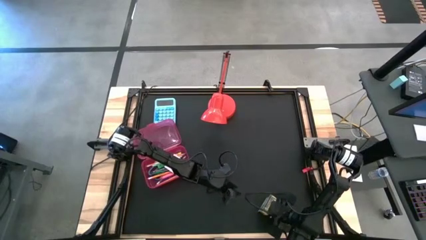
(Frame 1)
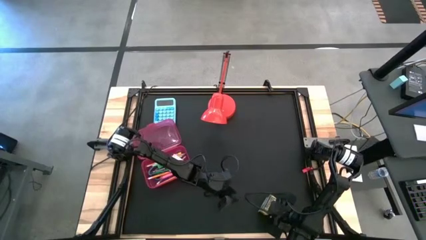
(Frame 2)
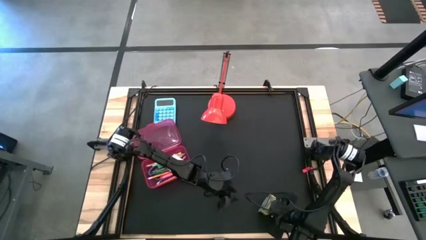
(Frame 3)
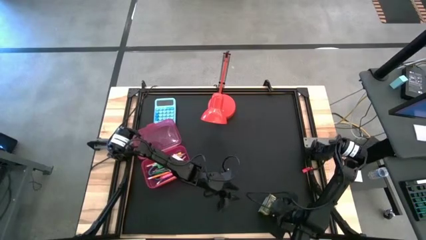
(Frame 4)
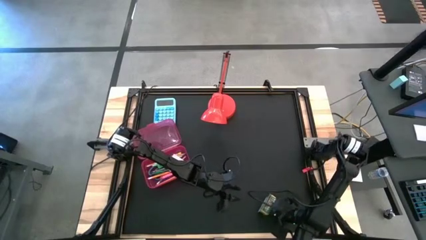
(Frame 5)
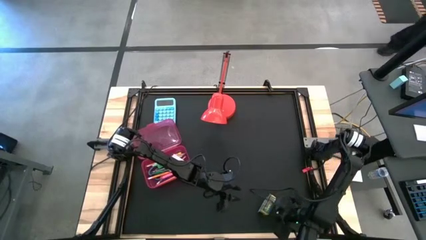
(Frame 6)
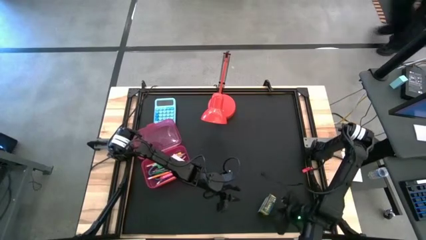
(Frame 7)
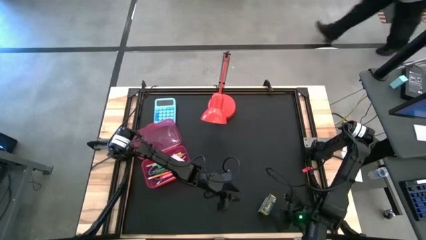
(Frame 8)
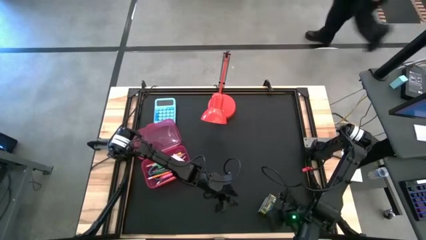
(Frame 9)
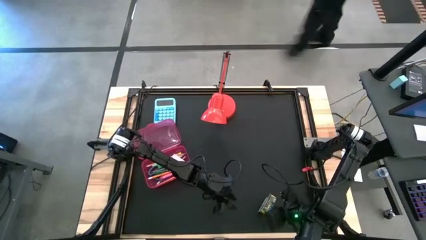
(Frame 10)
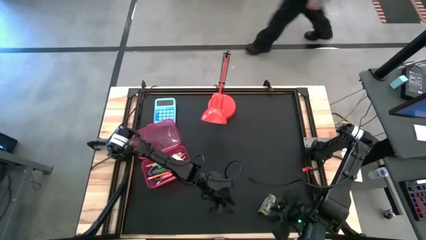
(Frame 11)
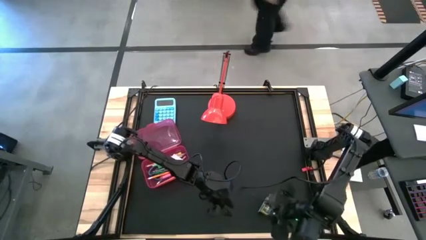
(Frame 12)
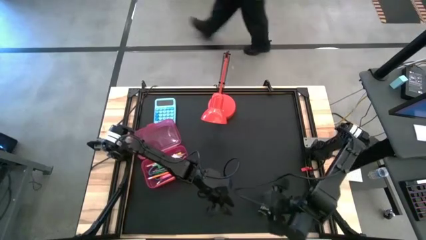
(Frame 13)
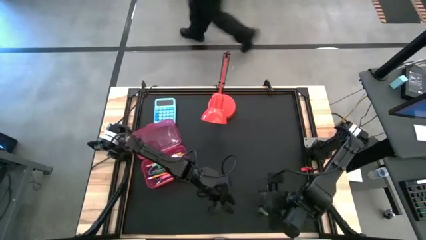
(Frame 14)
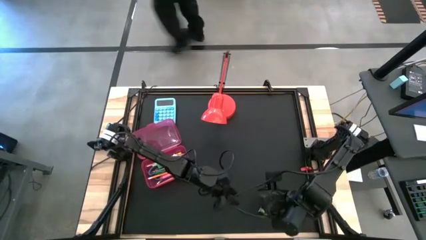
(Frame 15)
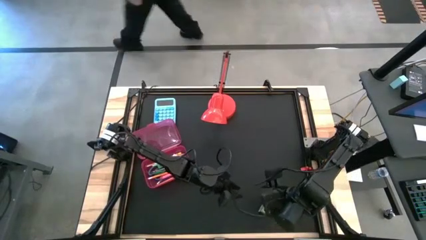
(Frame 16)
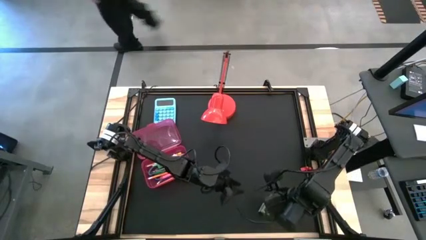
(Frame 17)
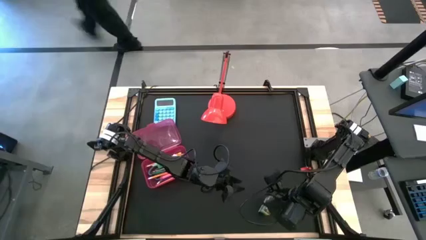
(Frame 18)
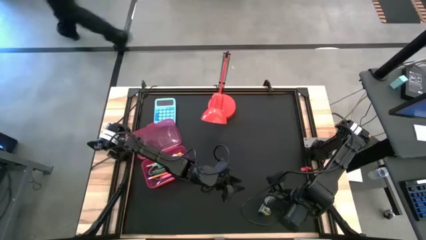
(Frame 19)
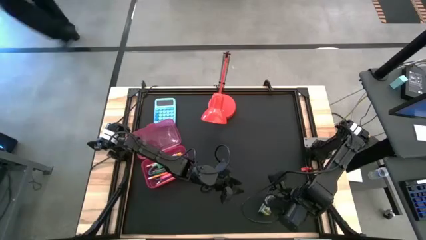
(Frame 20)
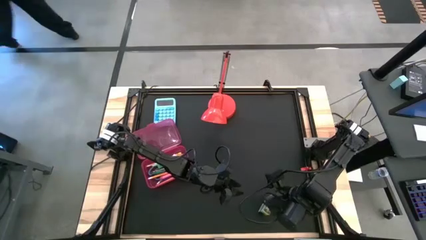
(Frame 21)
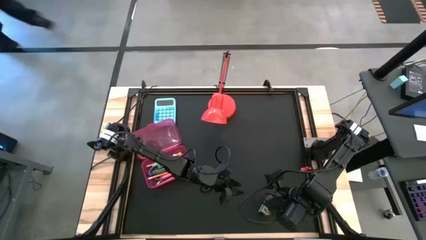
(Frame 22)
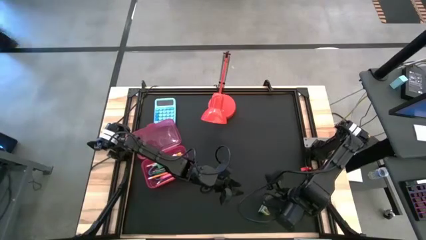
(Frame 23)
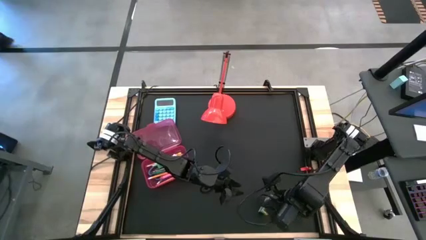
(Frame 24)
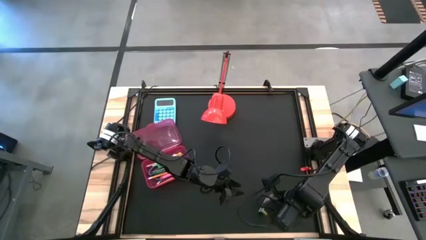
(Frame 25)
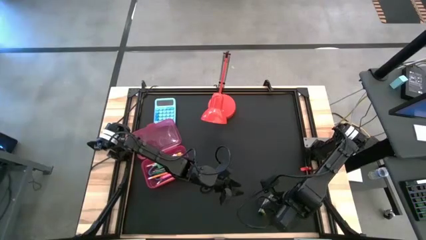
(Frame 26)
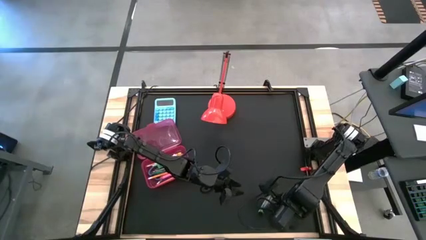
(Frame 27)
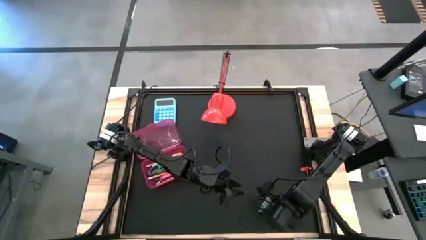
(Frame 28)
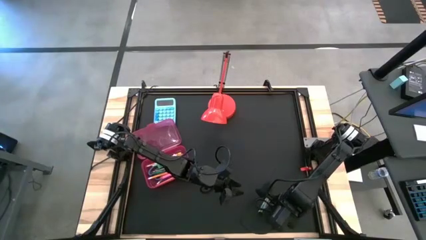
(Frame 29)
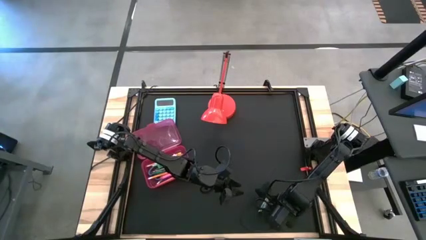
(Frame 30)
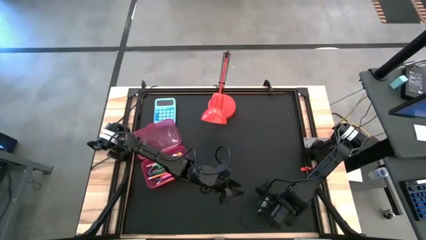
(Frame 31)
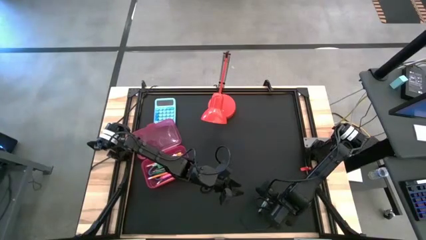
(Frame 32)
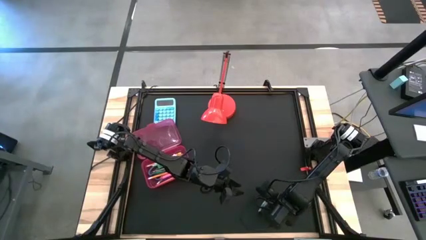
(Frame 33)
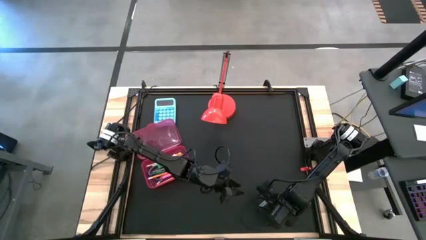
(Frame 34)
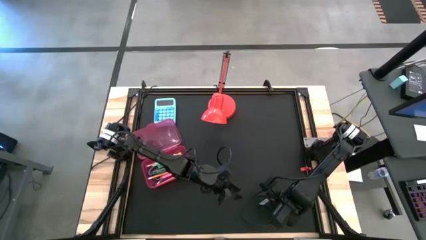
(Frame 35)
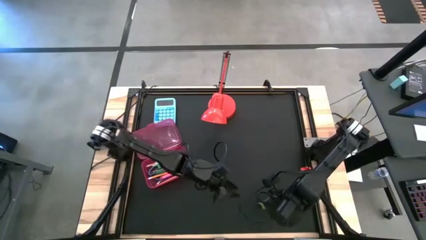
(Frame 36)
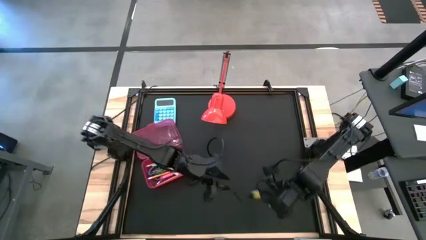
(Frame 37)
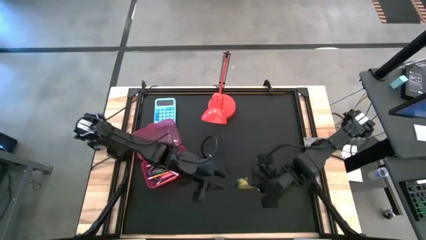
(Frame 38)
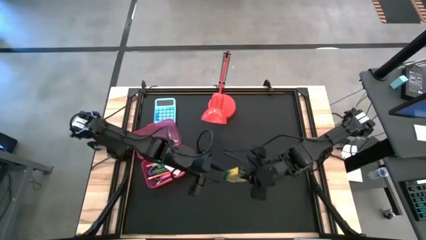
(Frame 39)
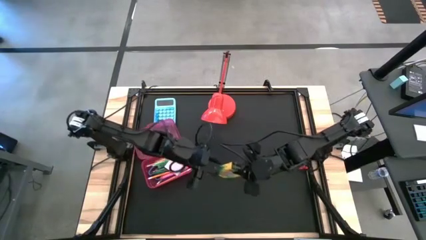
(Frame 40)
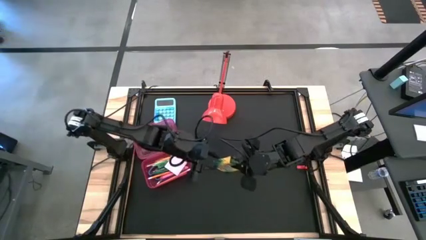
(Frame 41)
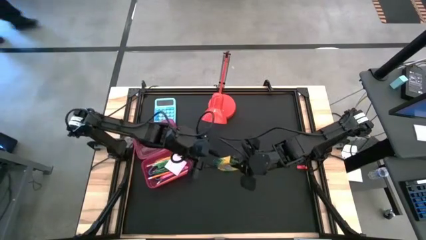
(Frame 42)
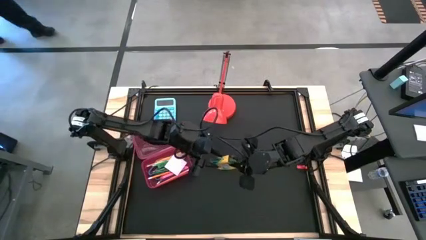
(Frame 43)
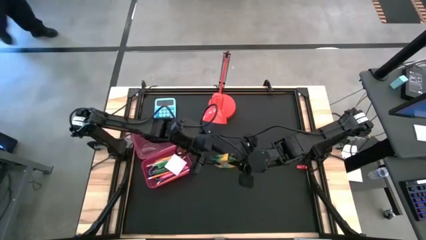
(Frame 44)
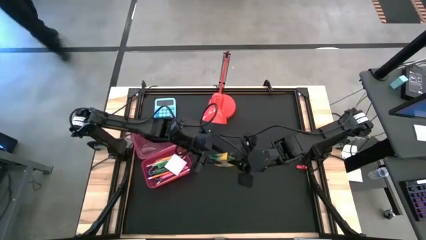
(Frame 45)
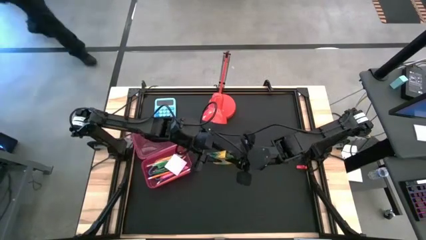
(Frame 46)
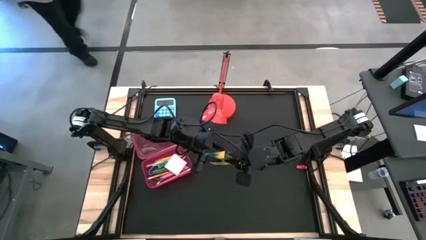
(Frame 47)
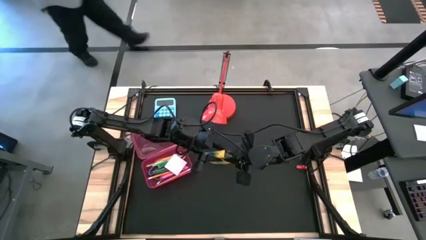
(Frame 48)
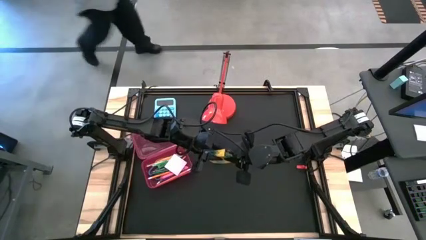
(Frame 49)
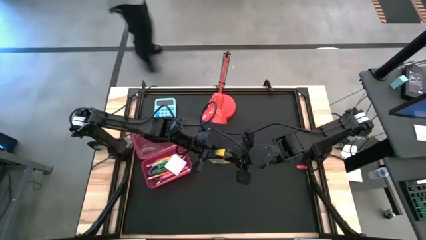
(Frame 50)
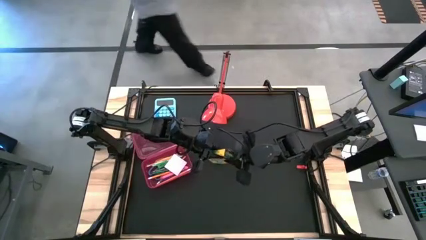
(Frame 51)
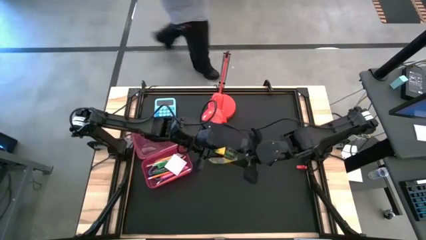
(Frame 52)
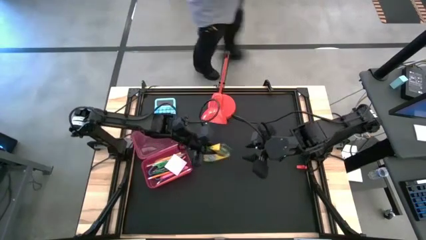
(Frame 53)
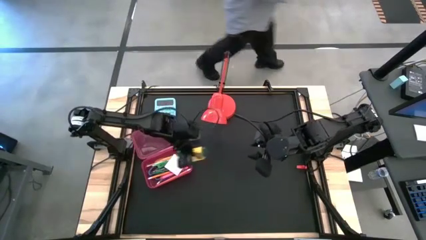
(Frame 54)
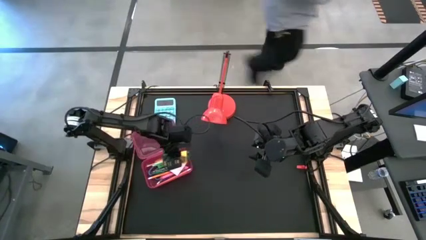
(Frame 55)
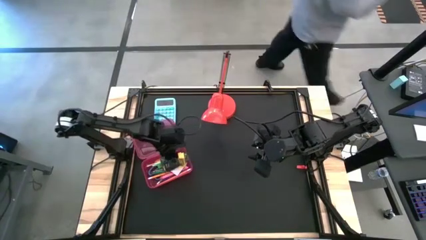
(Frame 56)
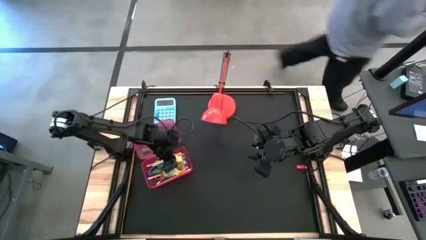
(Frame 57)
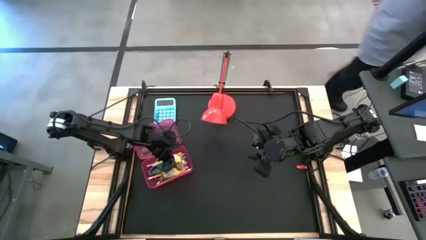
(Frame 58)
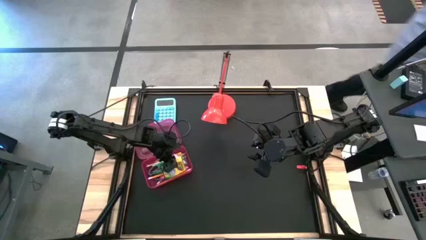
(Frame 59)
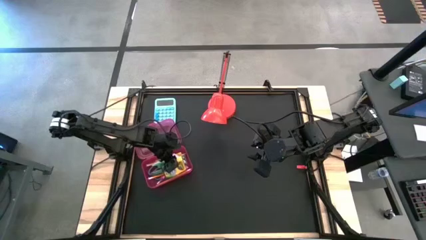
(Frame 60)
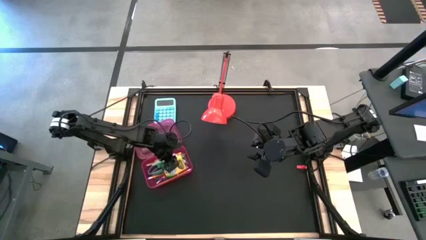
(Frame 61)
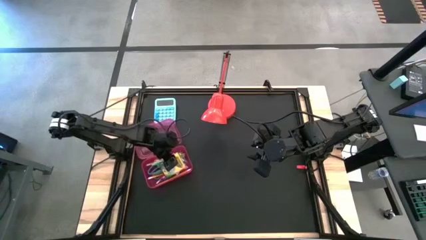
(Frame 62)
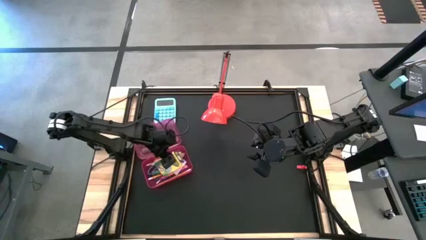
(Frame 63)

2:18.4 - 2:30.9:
Task: Pack school essentials
Put the yellow crayon box into the red supply box

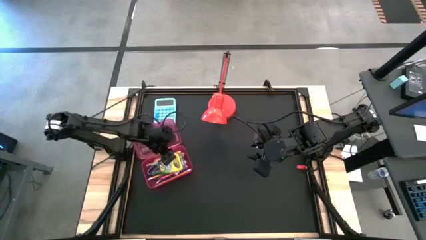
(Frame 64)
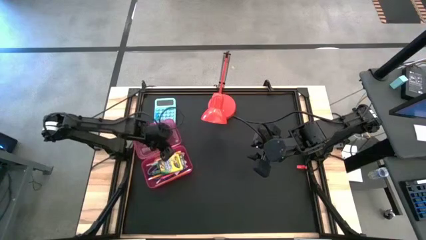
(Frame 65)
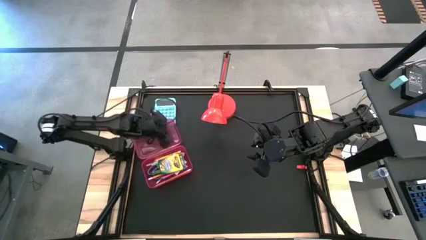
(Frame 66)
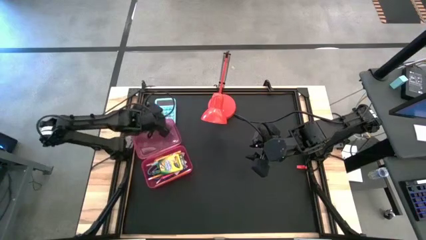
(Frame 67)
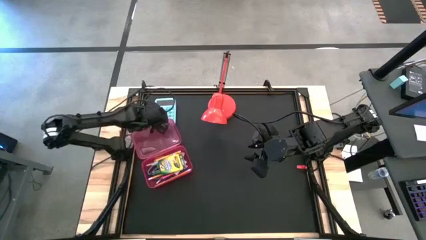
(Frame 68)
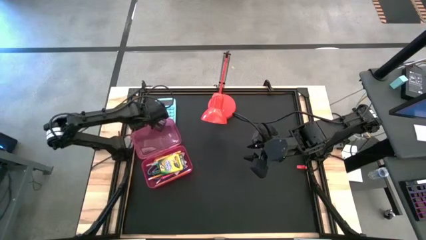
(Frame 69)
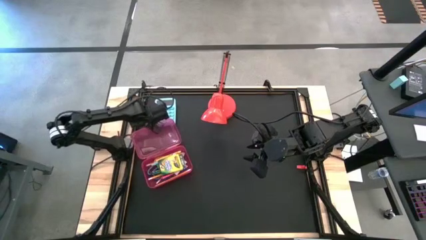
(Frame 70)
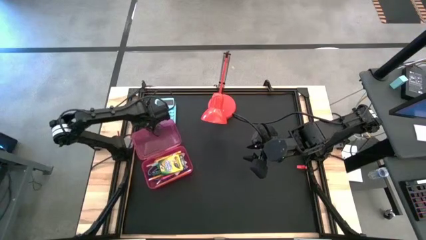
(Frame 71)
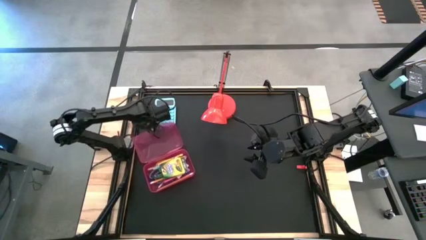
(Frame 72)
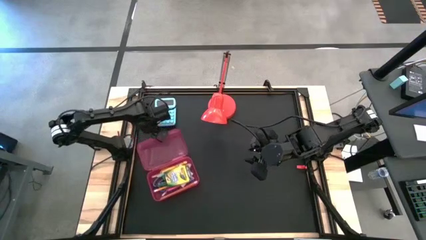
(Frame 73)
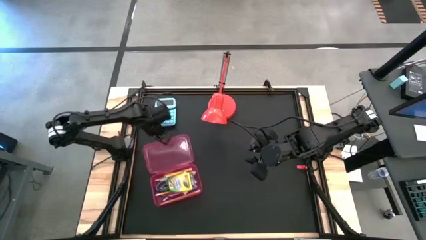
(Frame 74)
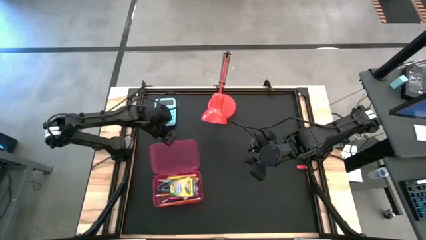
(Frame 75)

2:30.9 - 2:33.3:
Close the red supply box
